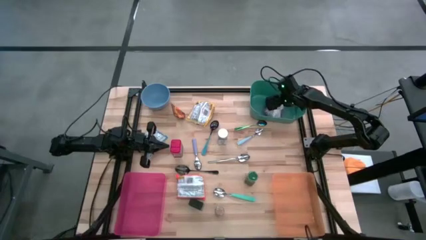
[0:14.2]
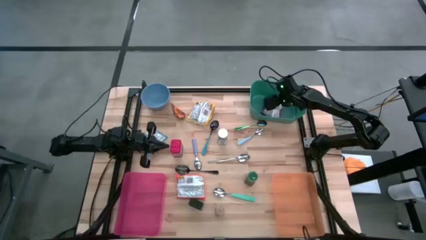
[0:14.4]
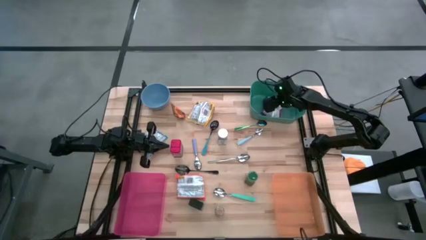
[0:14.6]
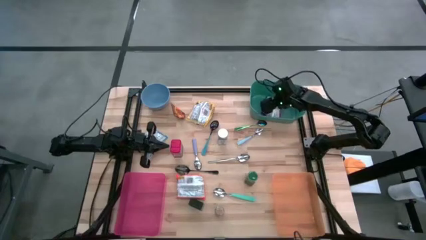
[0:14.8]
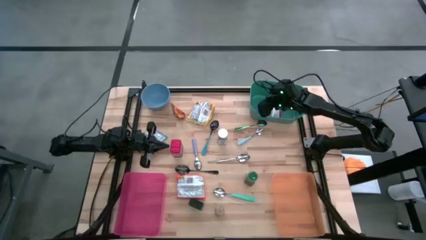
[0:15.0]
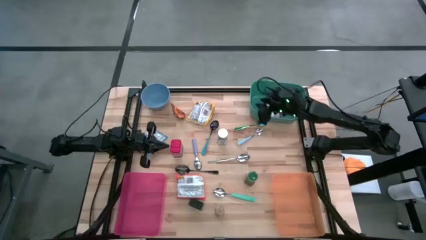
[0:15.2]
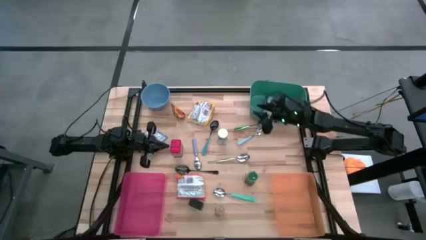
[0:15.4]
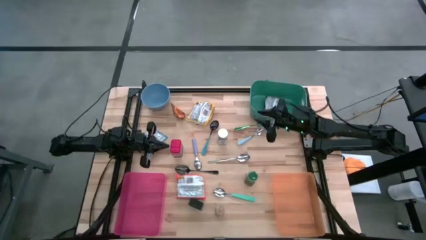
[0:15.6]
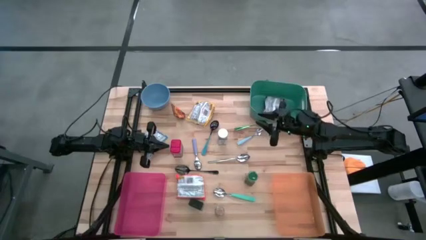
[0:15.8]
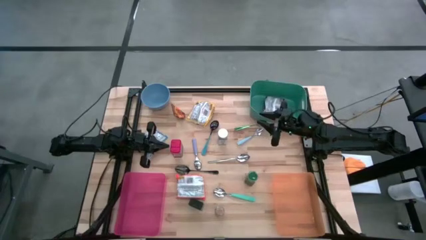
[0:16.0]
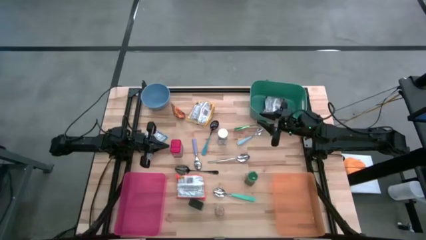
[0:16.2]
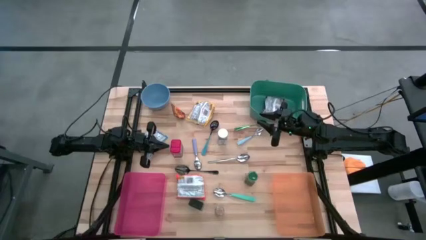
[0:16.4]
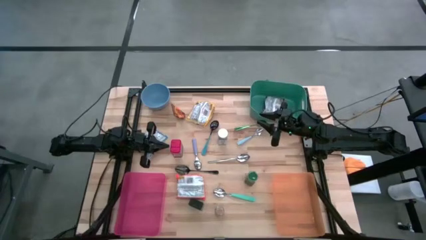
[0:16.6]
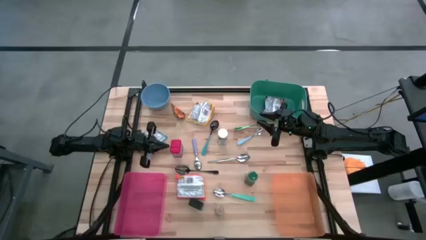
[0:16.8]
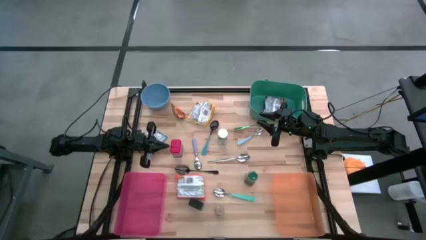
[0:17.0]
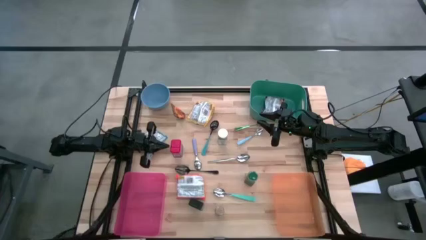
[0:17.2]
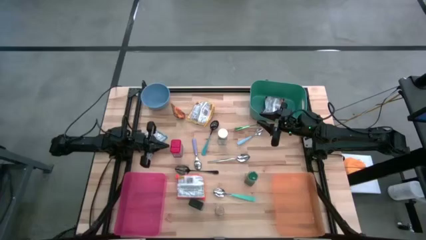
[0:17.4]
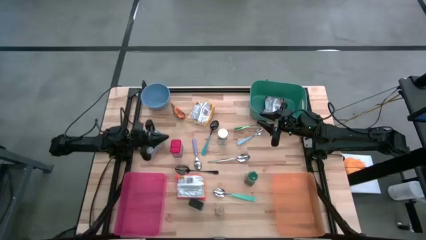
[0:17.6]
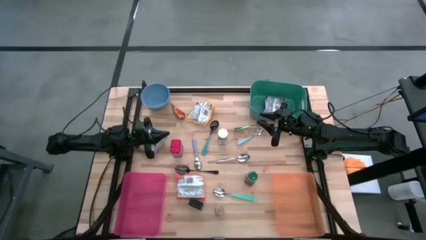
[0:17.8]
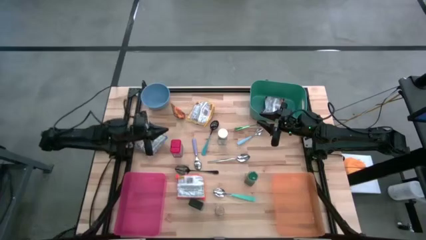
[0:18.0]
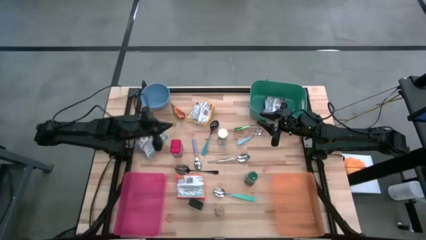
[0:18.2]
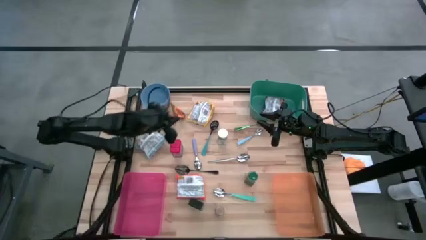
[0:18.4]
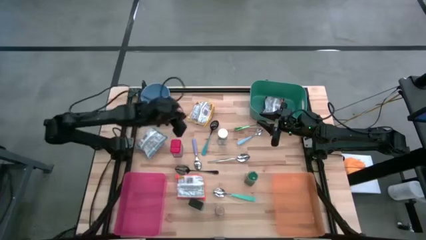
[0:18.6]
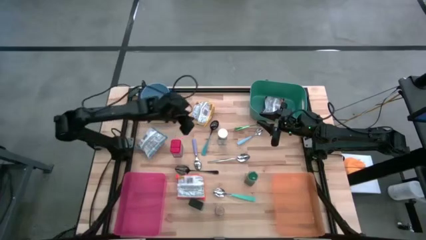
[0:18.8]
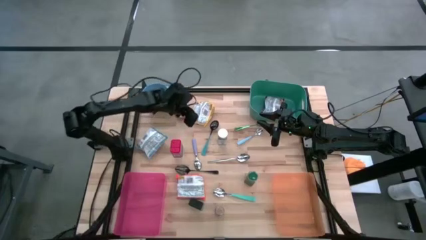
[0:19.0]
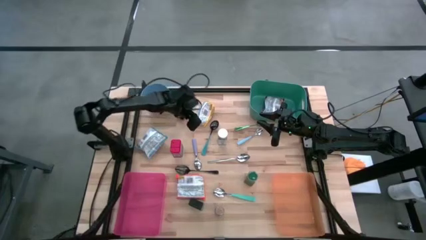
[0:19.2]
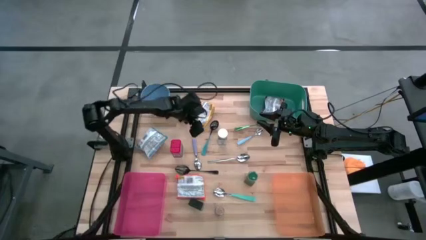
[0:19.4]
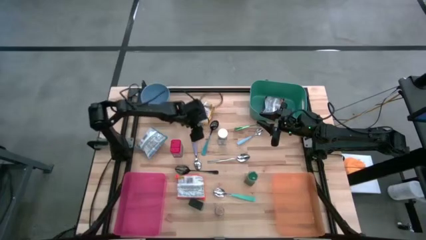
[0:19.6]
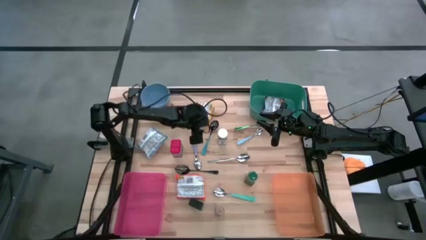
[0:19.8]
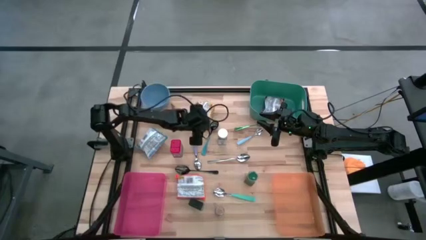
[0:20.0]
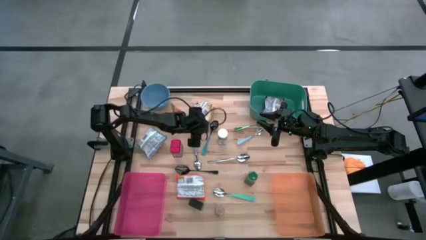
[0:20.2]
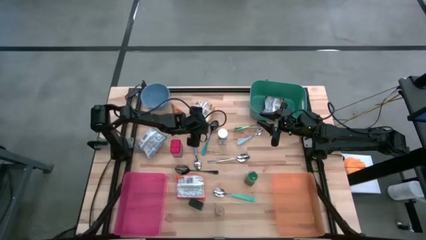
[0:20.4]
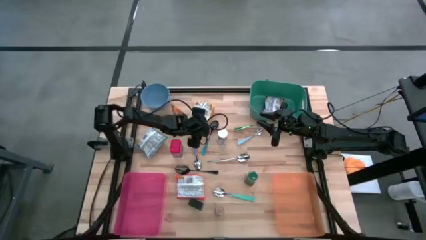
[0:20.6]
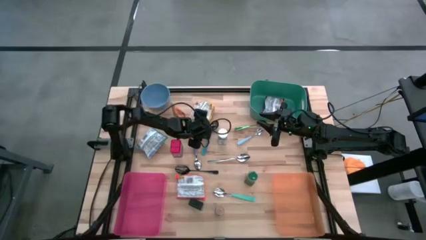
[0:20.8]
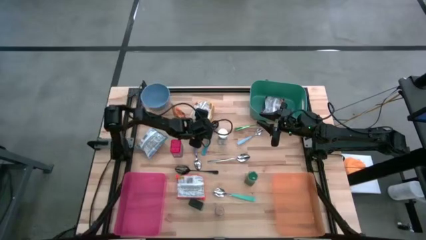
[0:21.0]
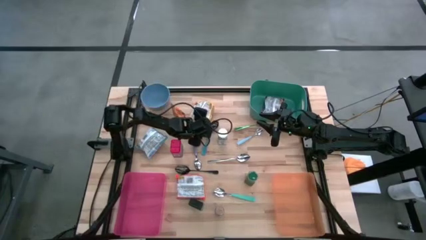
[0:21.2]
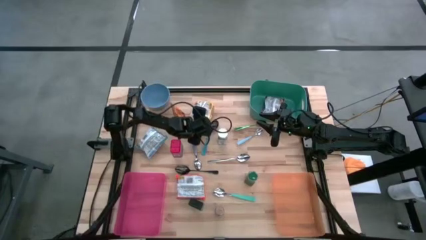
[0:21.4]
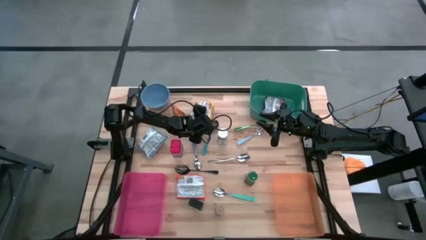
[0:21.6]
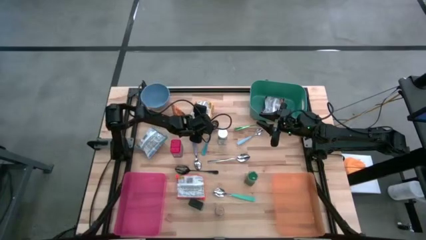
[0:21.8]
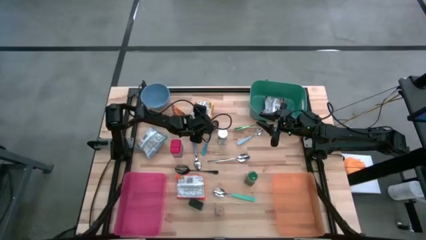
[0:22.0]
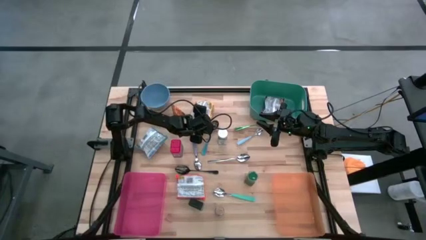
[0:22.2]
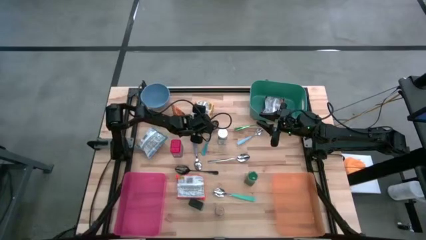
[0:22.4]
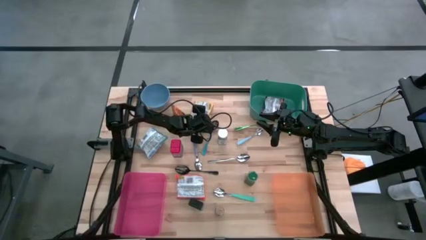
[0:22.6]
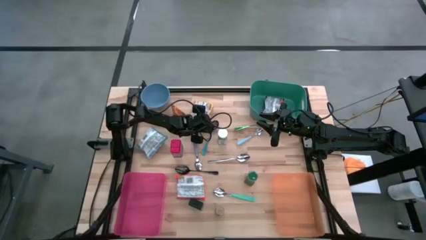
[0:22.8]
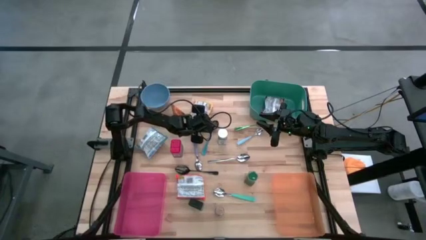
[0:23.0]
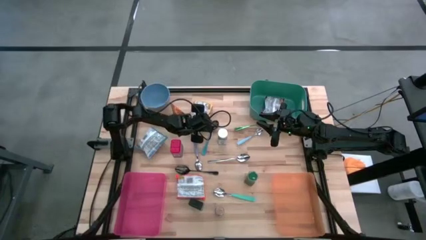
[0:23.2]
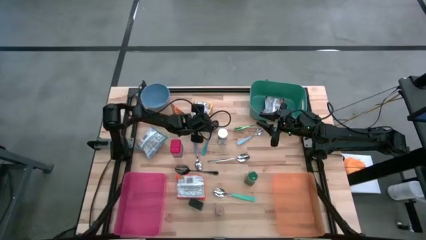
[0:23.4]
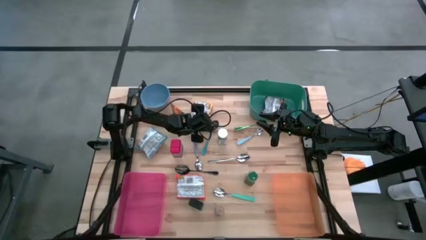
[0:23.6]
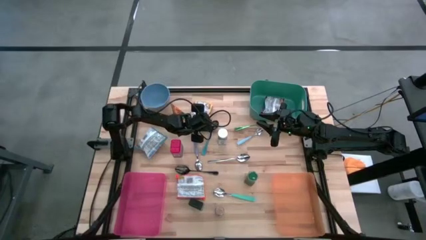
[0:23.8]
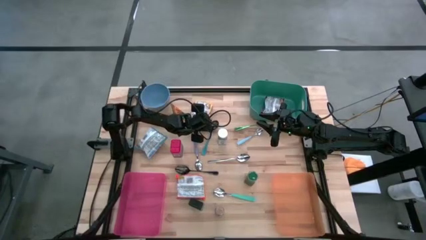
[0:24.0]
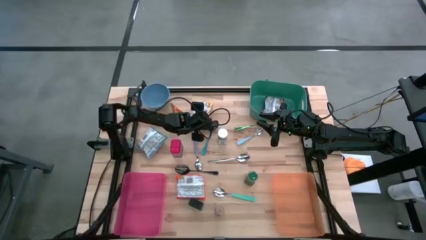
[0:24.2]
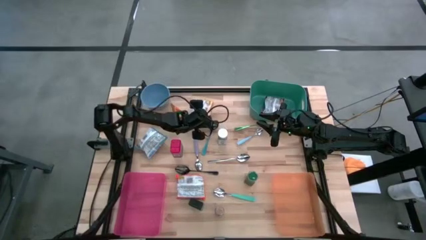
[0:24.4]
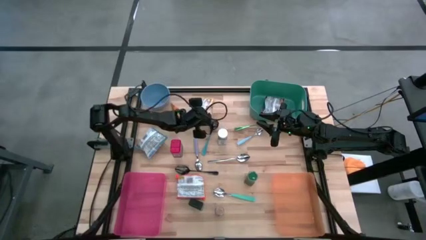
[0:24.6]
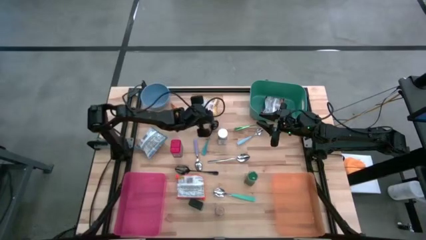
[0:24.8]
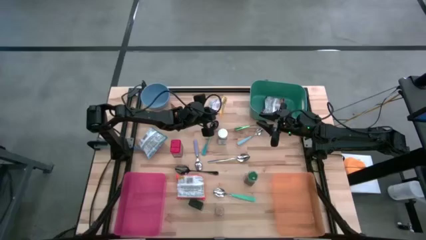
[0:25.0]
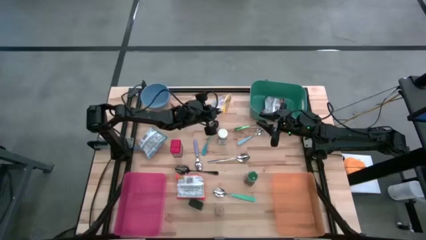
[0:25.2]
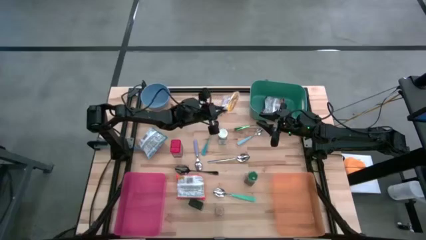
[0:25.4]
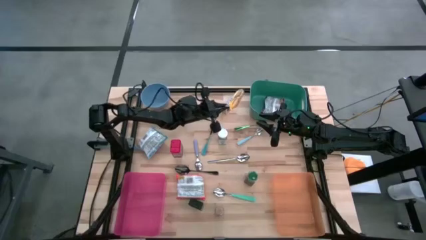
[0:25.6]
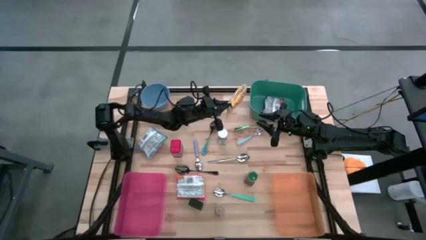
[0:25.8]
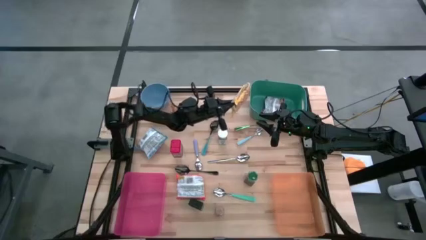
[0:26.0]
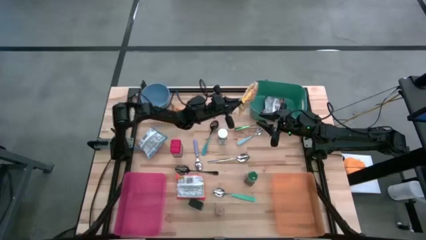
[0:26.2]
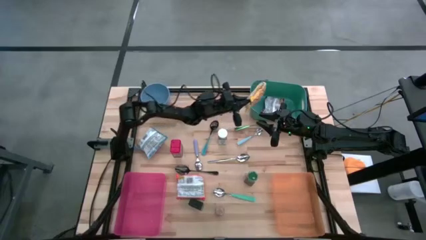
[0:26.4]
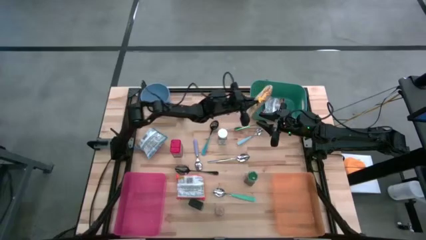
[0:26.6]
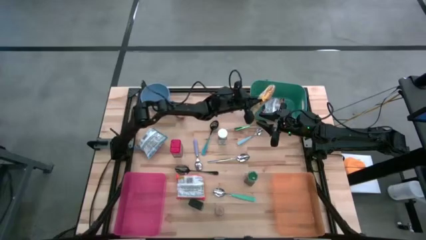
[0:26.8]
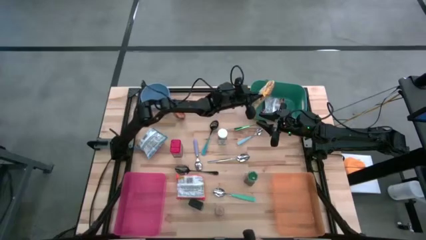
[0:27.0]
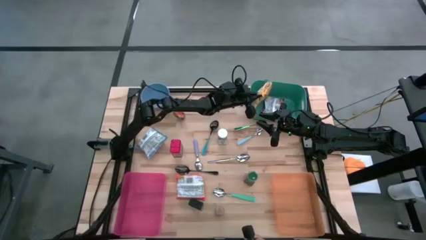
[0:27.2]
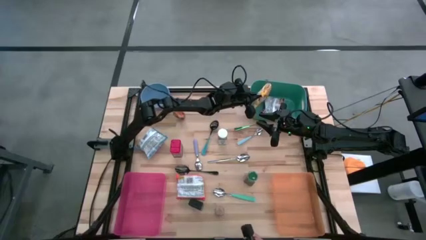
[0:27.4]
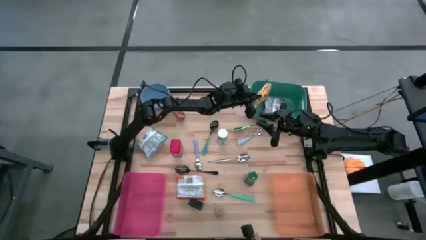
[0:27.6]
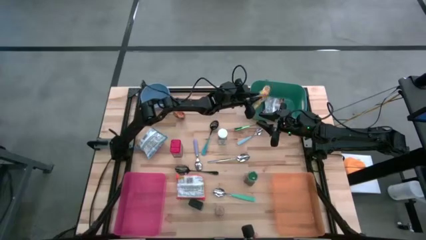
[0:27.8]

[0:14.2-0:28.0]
Put the yellow noodle pack into the green bin
